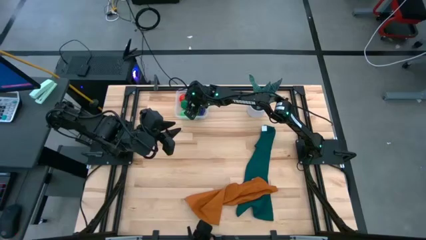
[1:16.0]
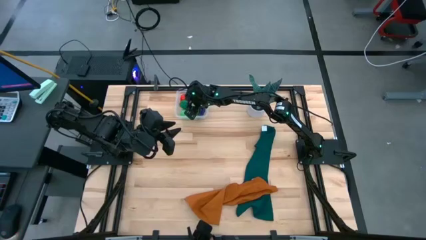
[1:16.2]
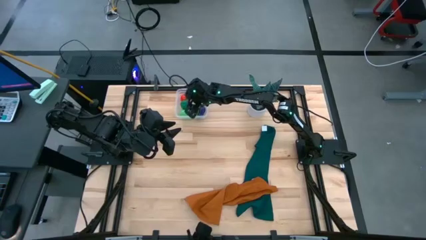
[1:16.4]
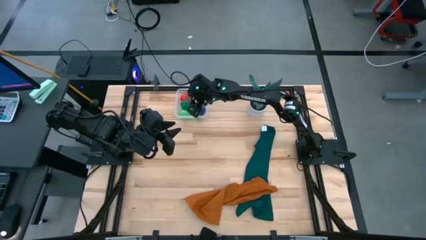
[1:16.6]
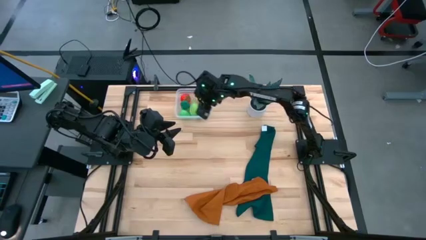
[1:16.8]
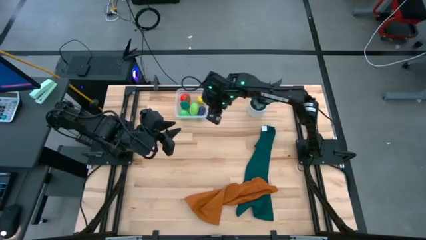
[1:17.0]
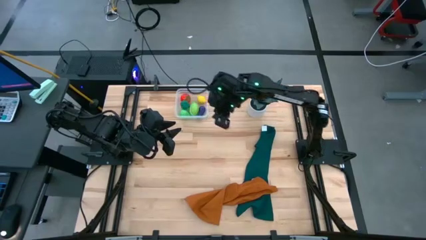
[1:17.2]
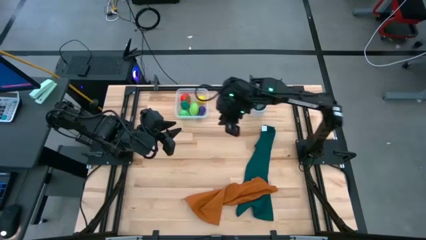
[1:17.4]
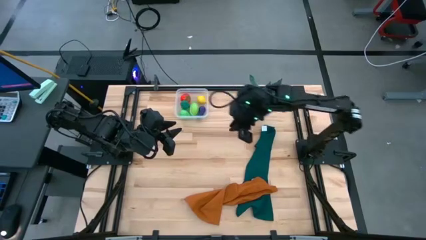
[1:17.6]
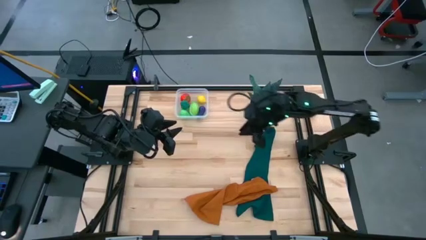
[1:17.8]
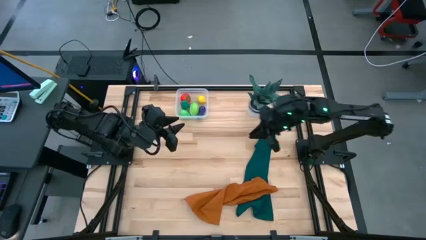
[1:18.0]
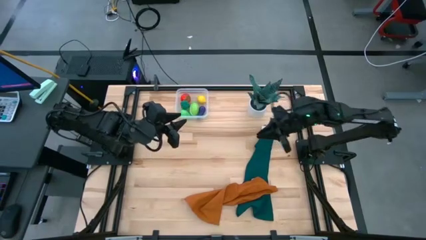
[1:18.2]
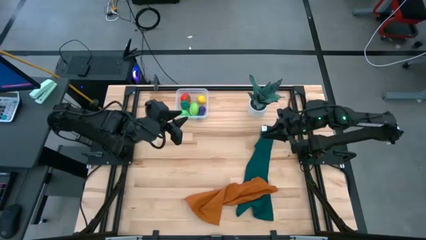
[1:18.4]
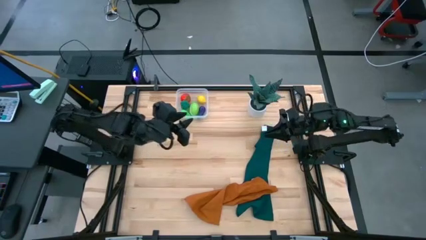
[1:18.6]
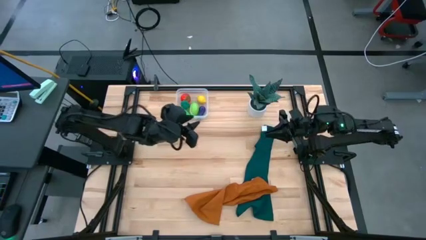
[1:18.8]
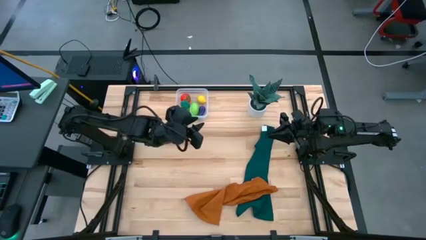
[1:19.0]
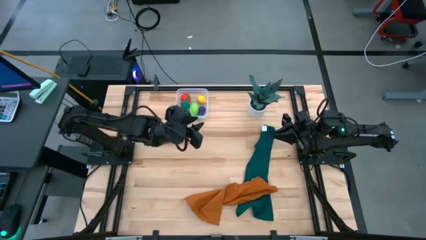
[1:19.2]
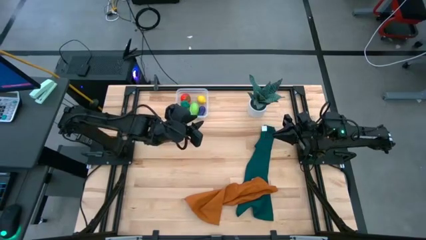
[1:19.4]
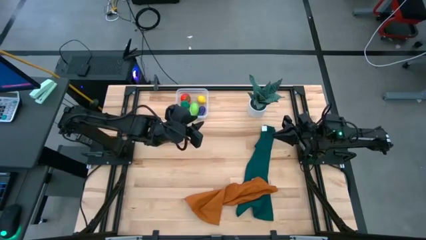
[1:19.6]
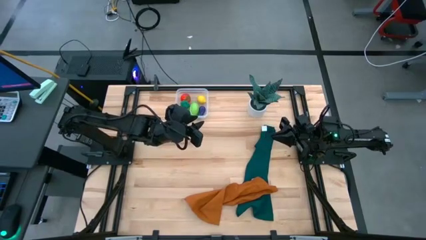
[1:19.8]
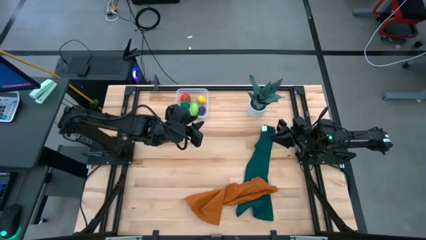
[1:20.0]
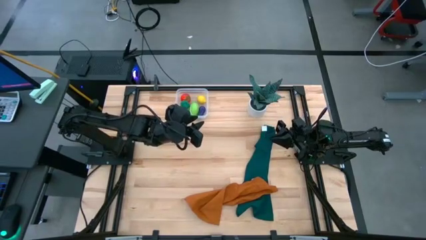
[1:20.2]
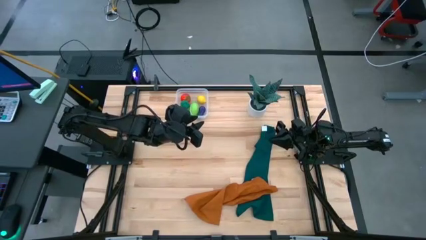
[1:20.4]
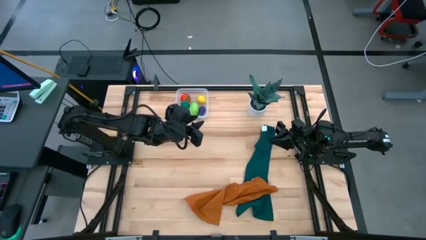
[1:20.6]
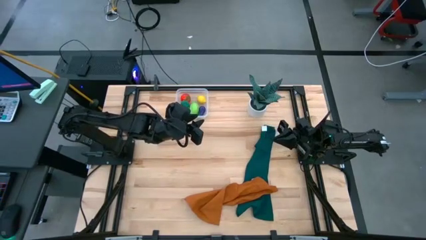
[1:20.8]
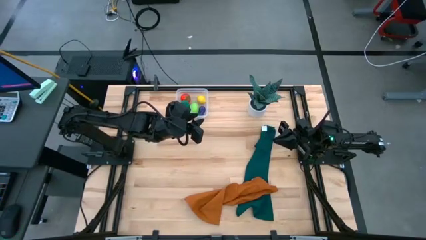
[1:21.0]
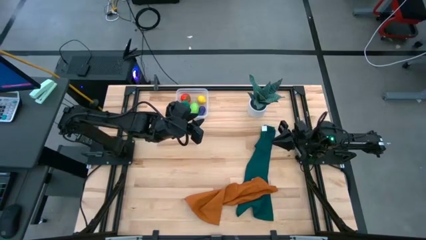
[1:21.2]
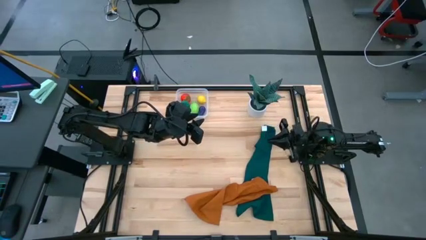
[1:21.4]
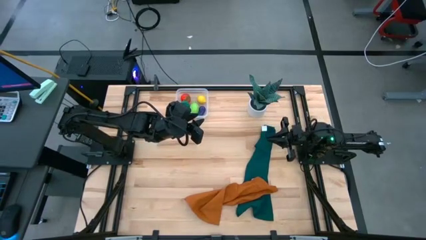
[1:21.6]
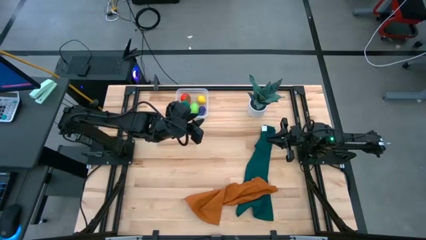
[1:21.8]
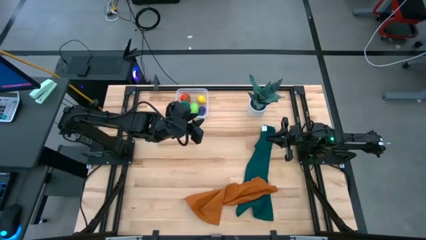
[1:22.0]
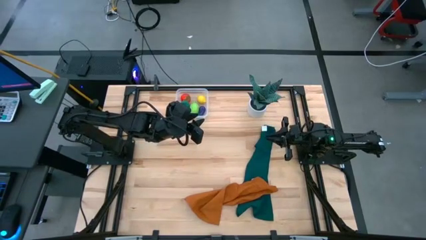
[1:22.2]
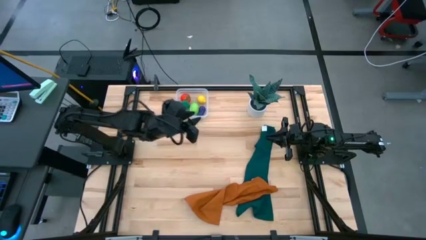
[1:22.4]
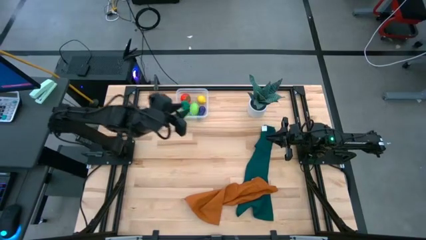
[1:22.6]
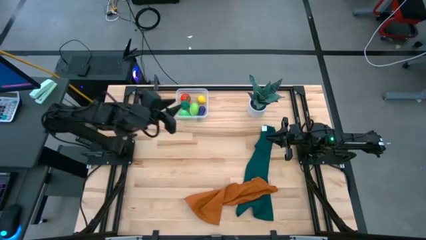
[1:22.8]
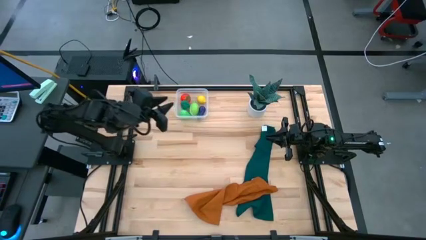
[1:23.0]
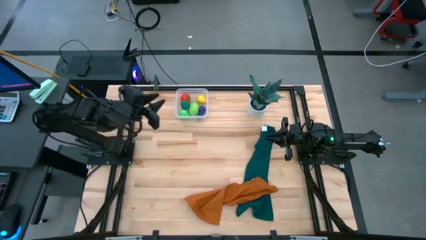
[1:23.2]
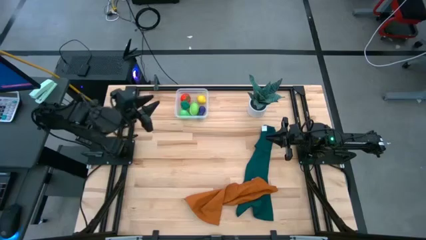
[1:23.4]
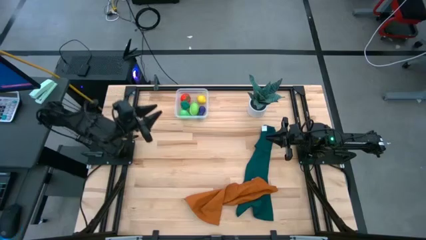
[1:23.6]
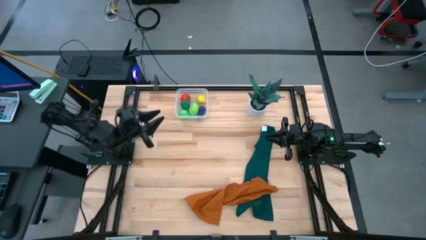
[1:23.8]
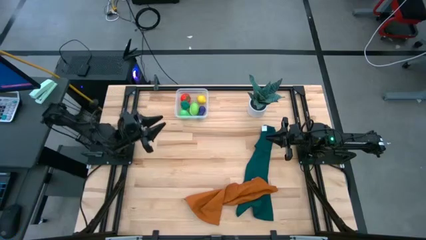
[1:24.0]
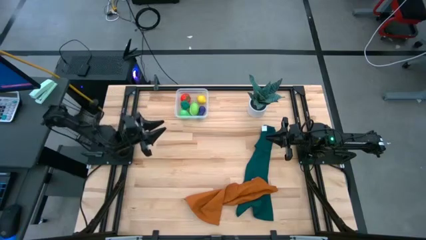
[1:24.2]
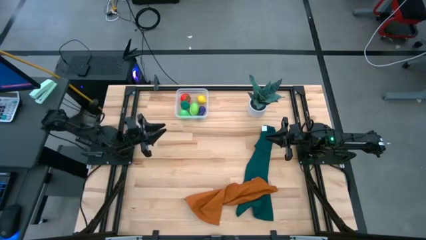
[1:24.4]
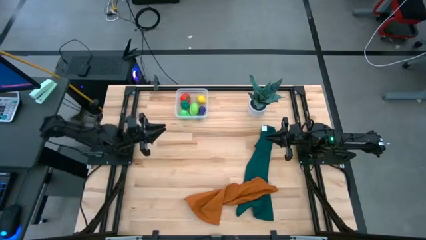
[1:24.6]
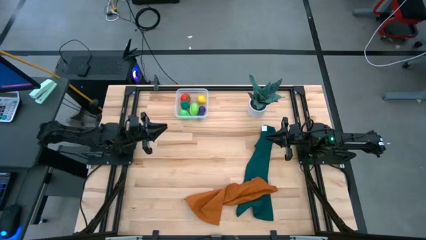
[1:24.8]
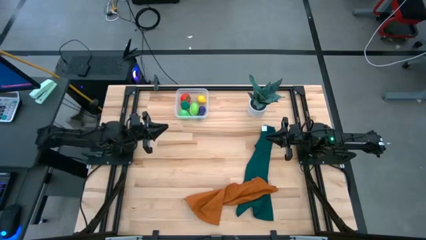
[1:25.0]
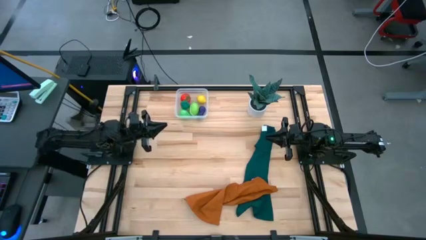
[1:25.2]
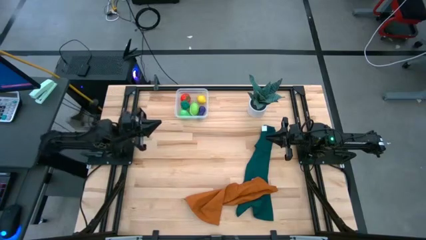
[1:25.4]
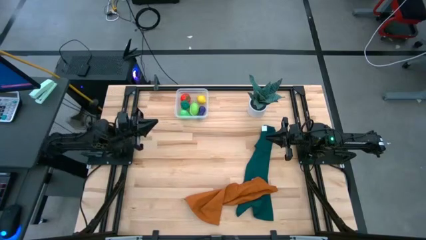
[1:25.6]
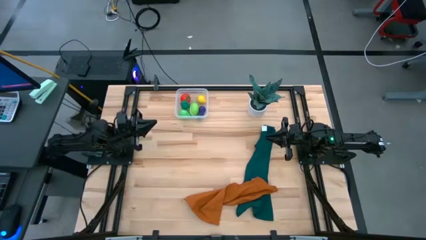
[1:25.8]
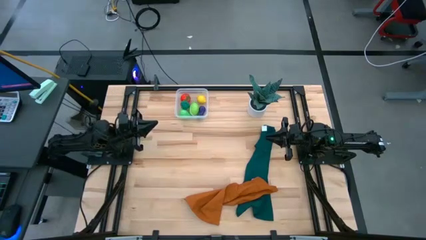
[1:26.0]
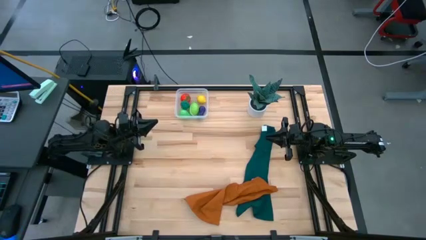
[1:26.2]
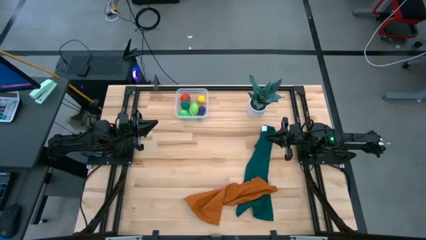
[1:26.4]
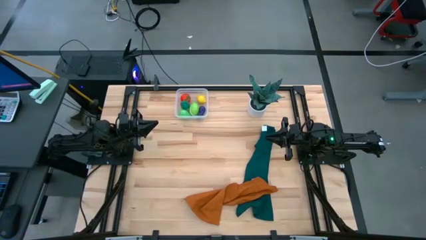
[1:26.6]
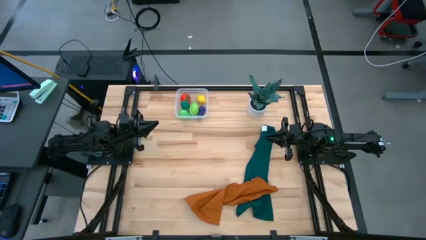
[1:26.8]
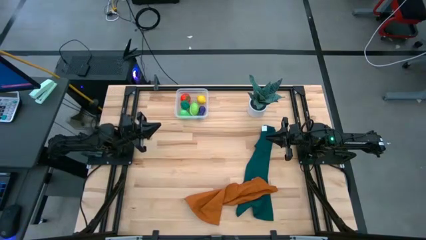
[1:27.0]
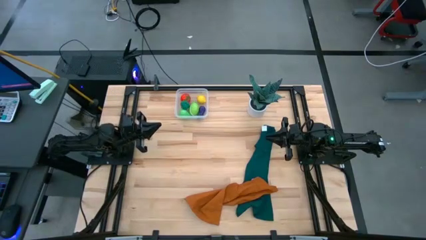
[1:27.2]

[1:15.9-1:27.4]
Task: Pick and placing Produce into tupperware
Return to Home Position

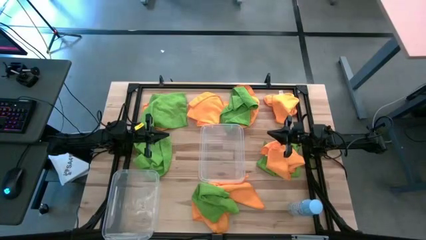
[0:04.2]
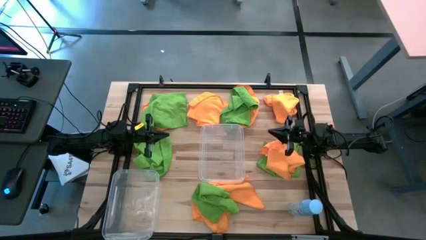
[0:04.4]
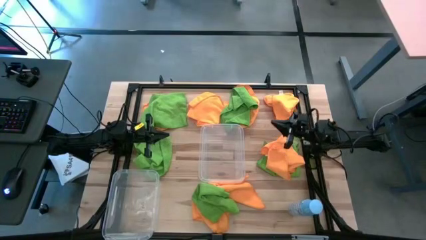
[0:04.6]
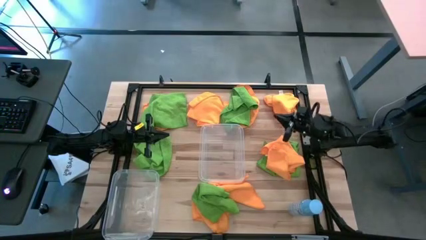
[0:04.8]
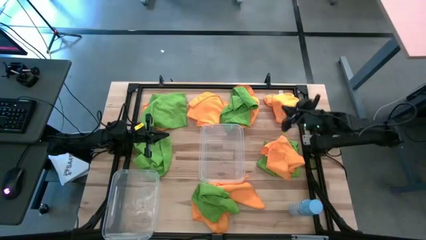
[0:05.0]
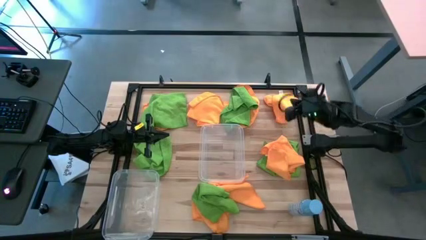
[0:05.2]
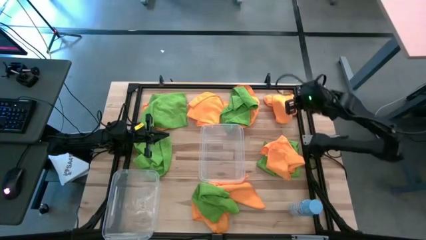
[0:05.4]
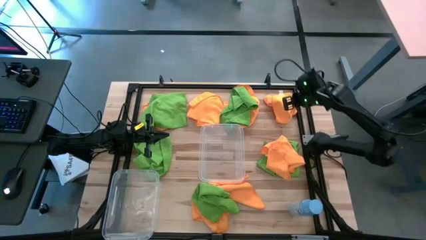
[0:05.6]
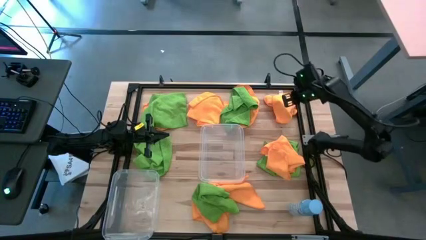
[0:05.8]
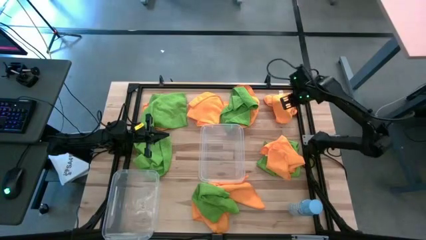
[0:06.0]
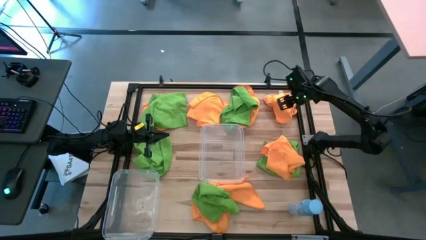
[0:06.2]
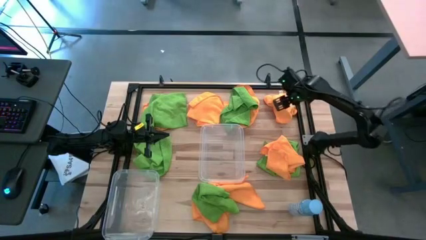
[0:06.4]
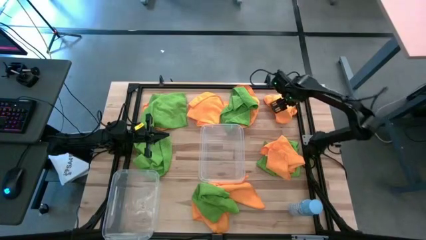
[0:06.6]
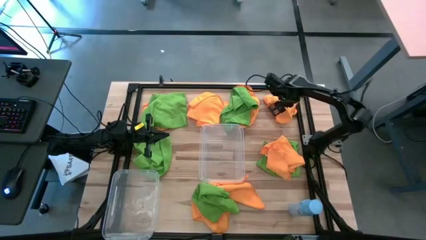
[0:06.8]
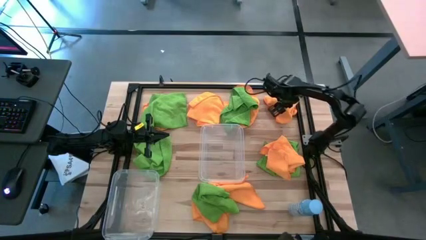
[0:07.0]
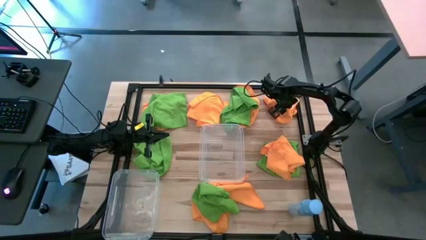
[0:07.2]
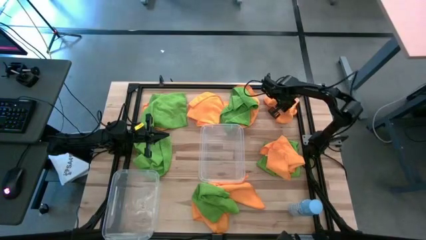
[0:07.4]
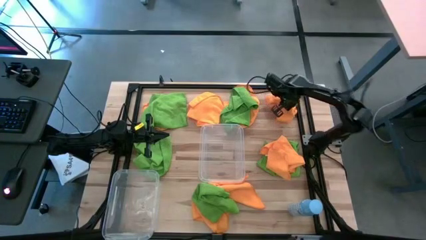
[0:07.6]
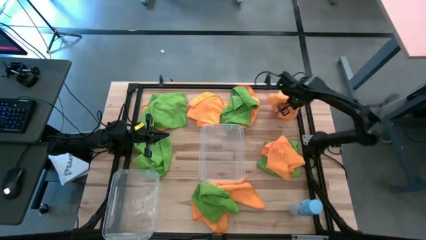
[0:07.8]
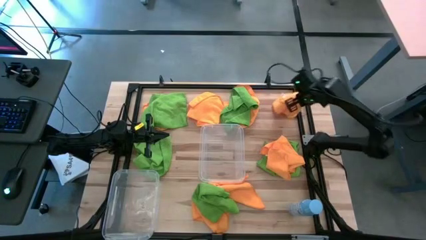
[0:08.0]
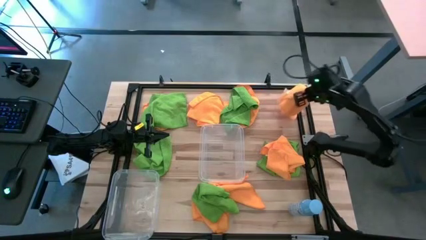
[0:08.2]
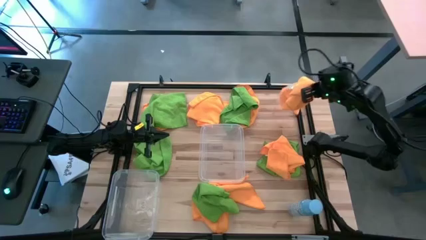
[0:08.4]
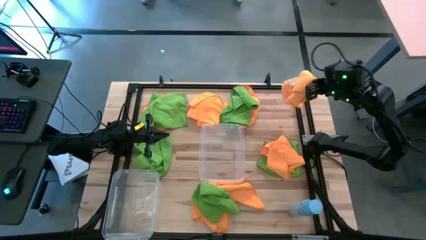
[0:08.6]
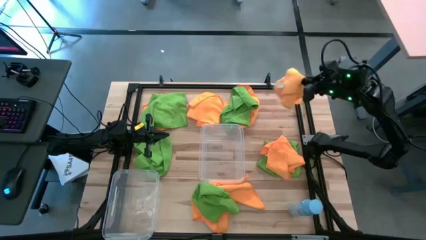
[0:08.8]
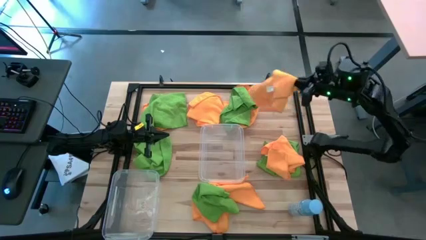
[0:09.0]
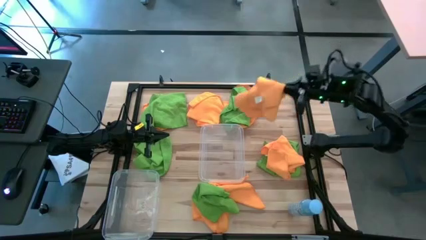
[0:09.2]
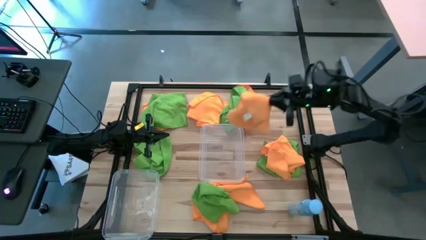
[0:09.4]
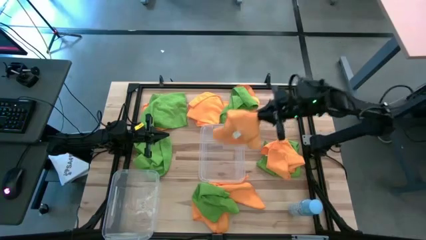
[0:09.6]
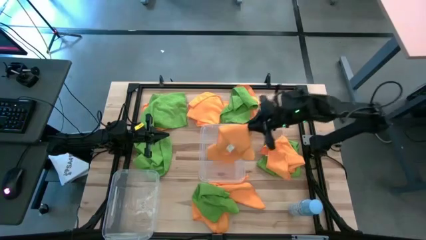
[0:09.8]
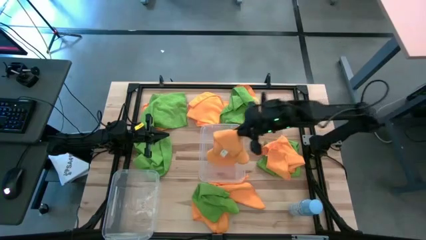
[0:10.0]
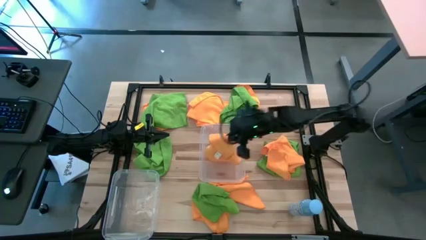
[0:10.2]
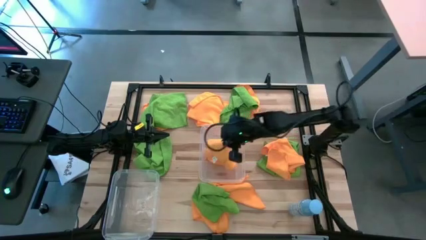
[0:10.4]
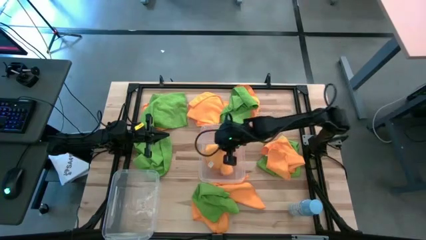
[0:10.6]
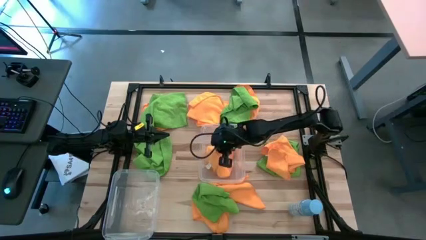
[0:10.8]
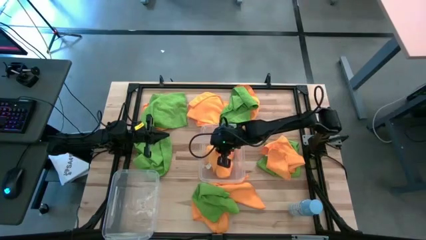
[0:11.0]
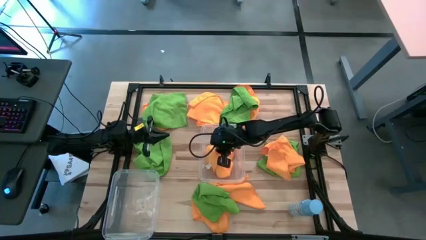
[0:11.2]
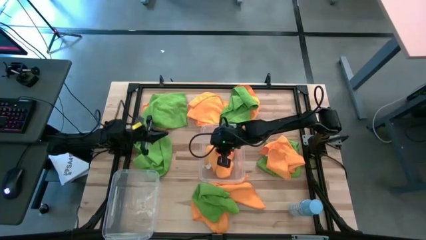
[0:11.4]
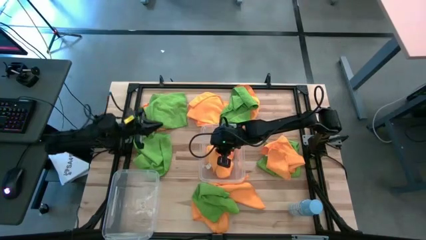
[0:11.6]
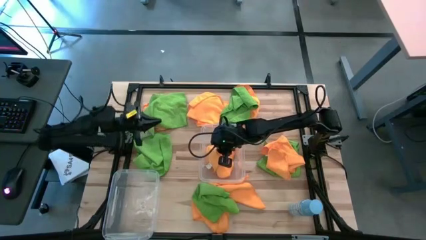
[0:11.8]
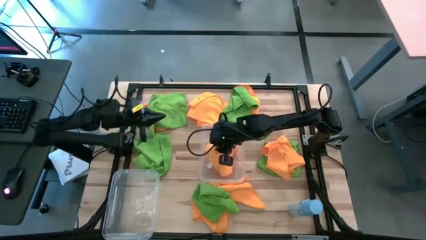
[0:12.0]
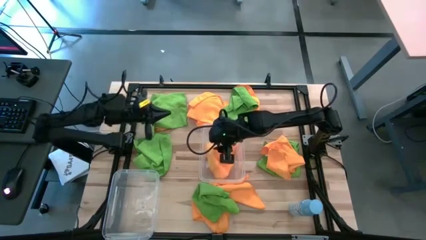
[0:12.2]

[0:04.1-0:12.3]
Task: Sort microfiber towel by color & place in baskets
Put the yellow microfiber towel into the right transparent bin
